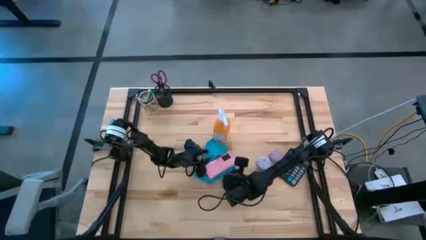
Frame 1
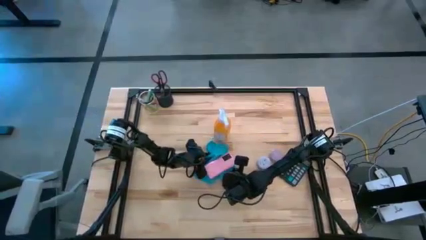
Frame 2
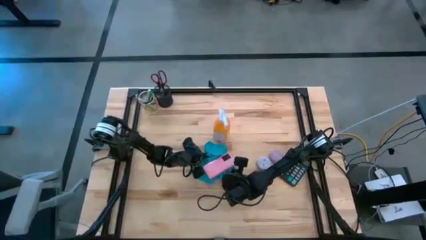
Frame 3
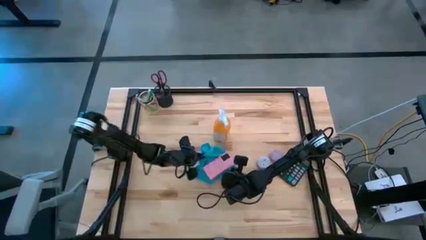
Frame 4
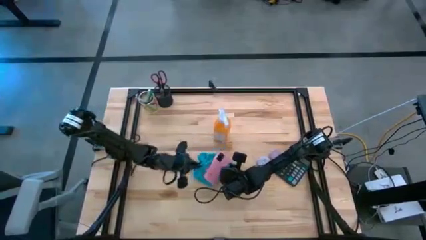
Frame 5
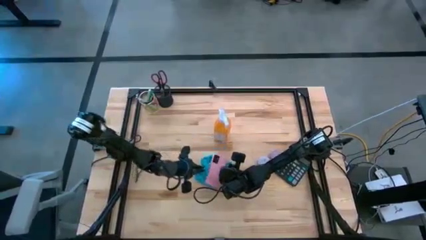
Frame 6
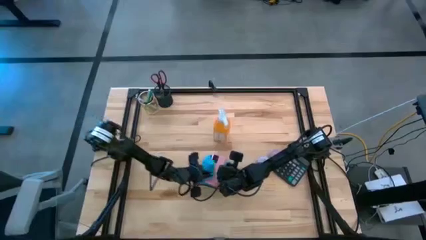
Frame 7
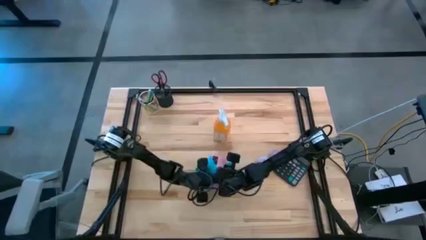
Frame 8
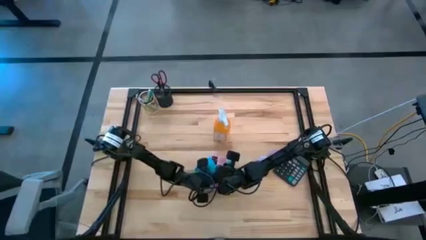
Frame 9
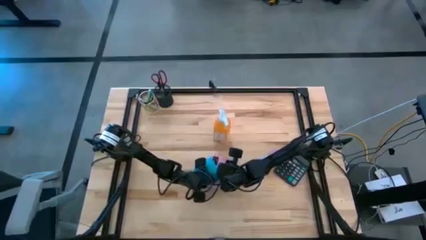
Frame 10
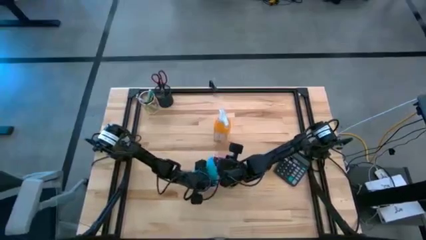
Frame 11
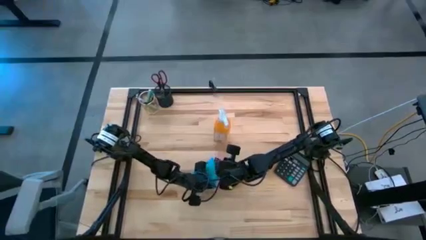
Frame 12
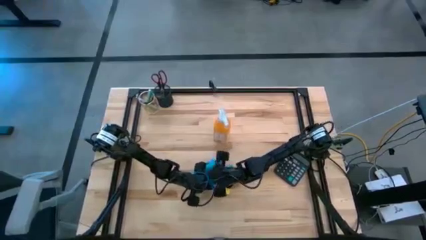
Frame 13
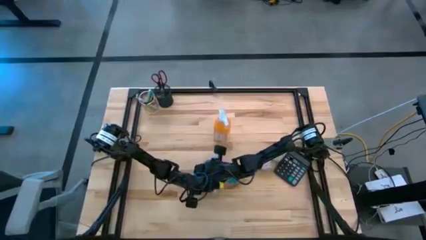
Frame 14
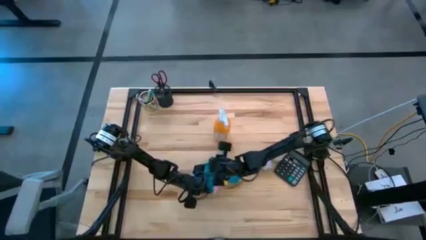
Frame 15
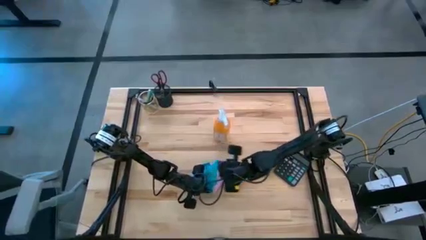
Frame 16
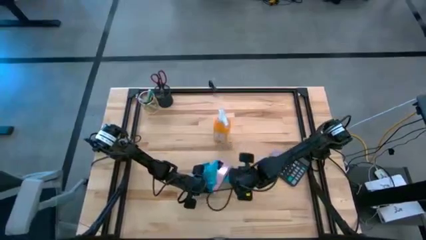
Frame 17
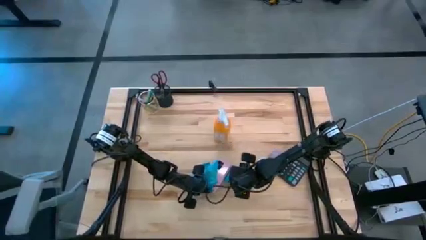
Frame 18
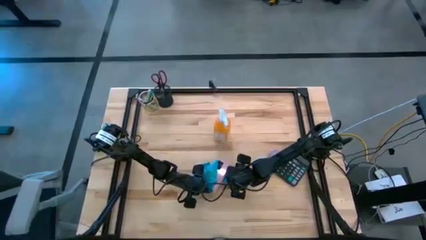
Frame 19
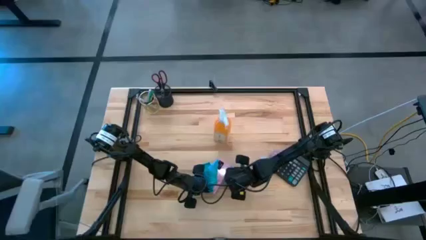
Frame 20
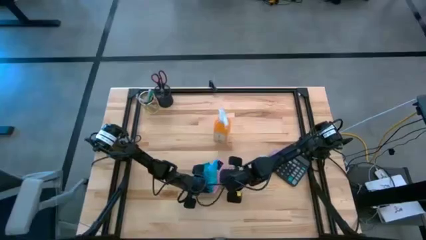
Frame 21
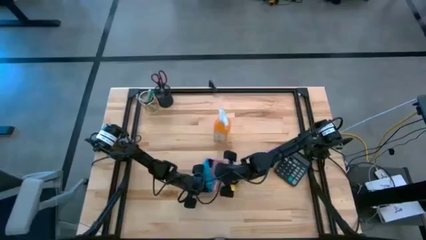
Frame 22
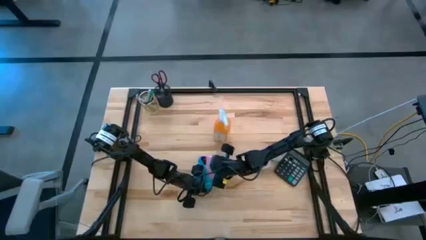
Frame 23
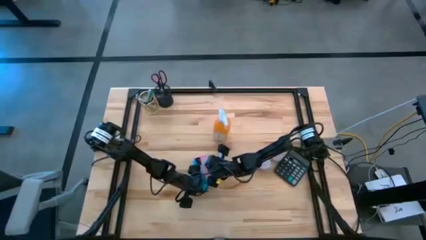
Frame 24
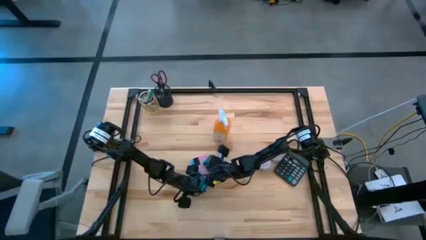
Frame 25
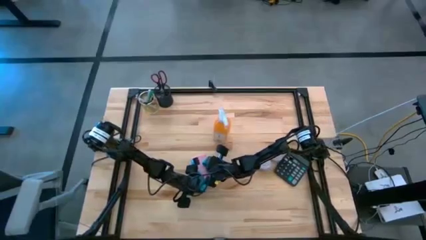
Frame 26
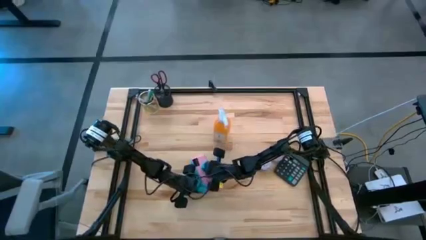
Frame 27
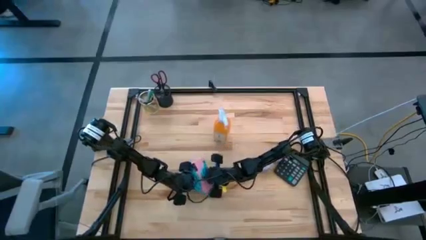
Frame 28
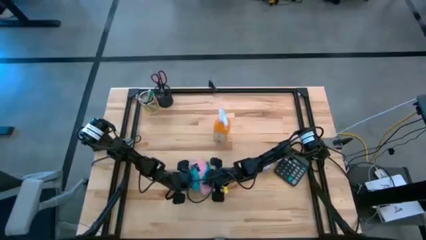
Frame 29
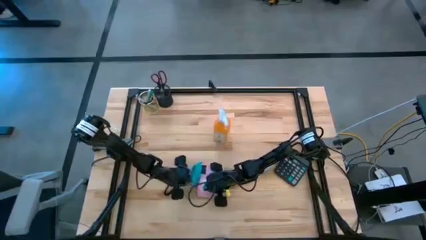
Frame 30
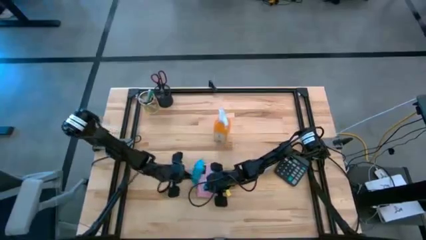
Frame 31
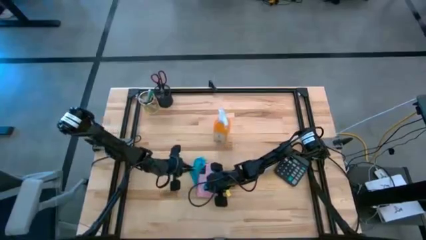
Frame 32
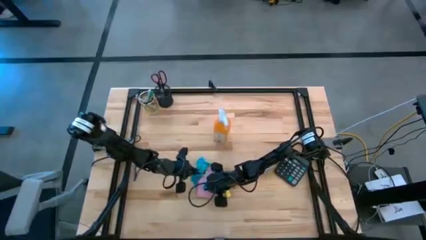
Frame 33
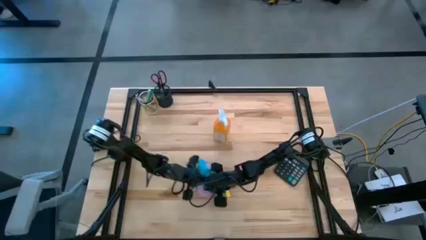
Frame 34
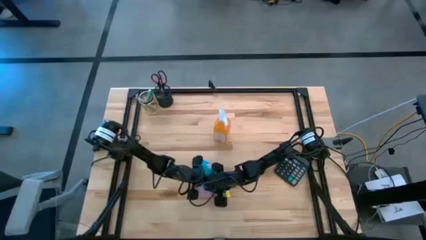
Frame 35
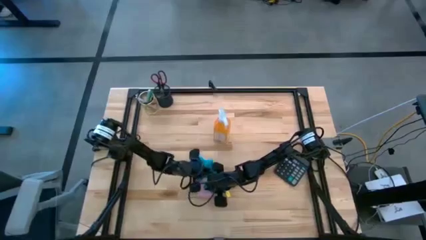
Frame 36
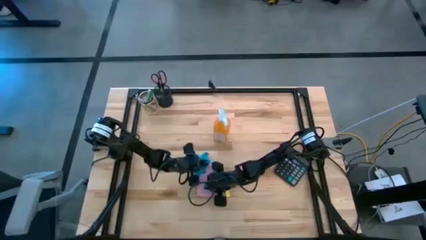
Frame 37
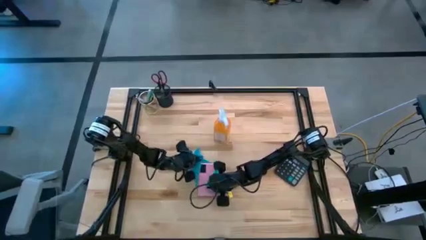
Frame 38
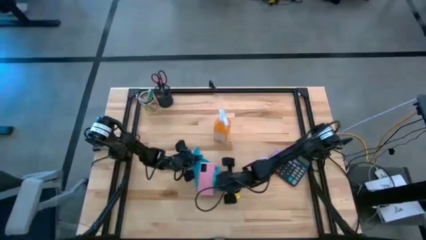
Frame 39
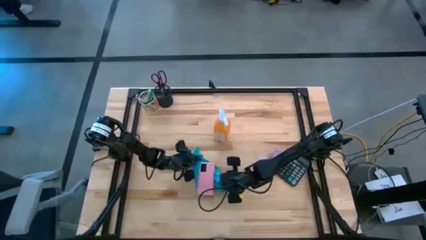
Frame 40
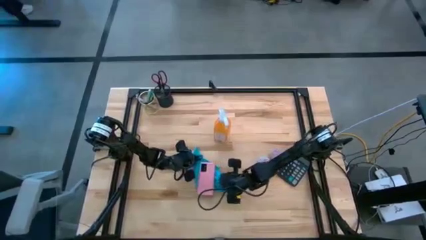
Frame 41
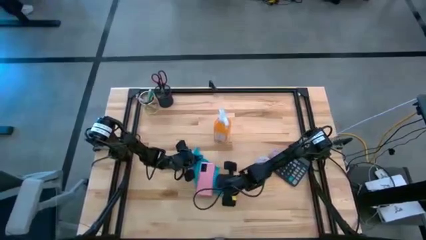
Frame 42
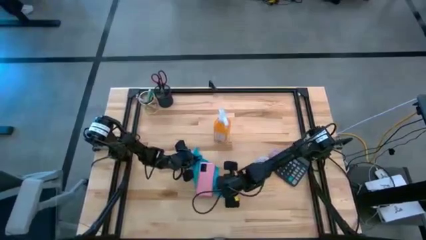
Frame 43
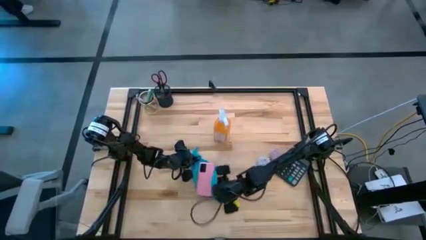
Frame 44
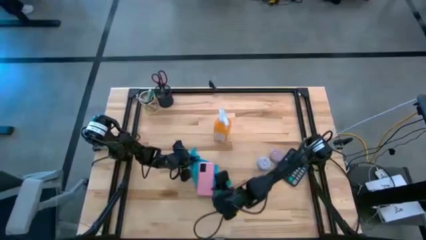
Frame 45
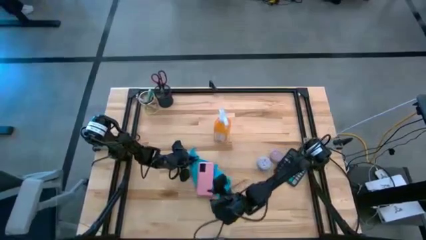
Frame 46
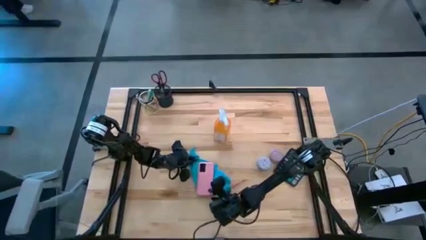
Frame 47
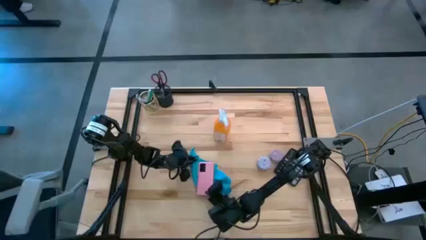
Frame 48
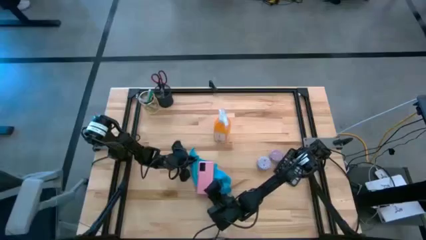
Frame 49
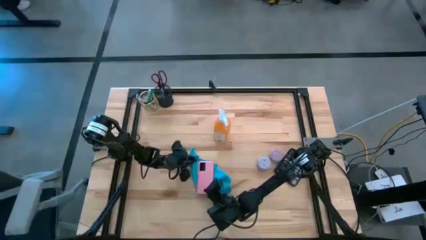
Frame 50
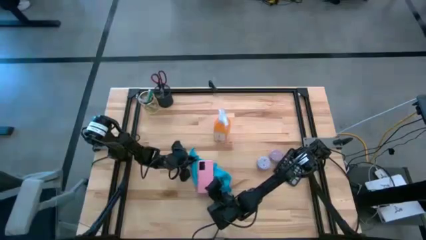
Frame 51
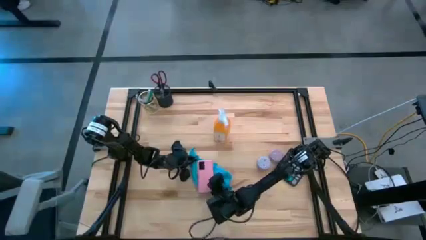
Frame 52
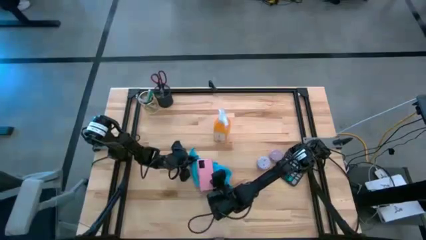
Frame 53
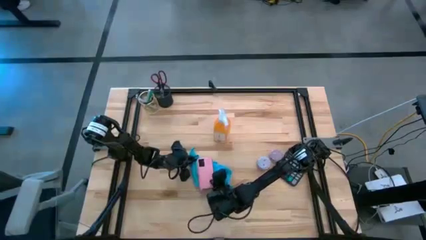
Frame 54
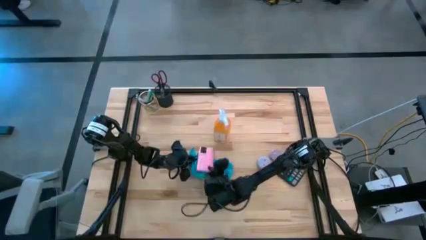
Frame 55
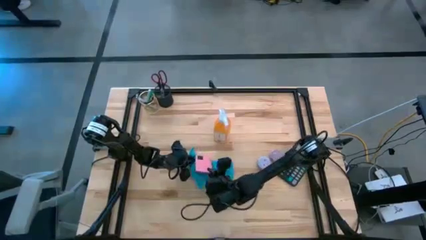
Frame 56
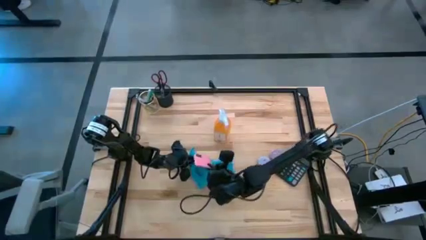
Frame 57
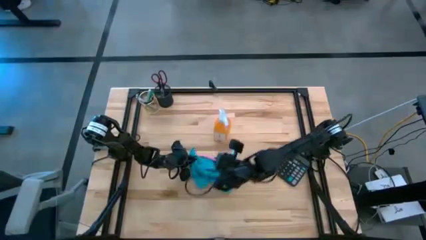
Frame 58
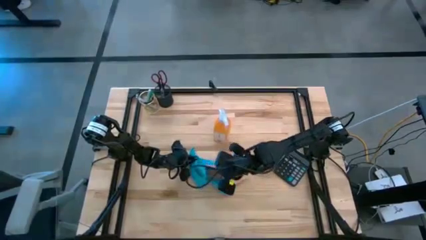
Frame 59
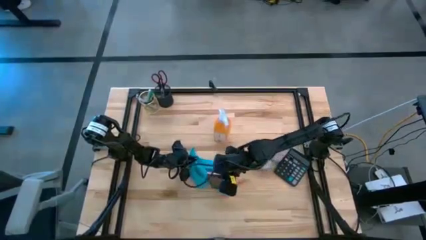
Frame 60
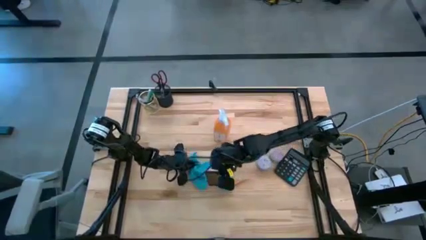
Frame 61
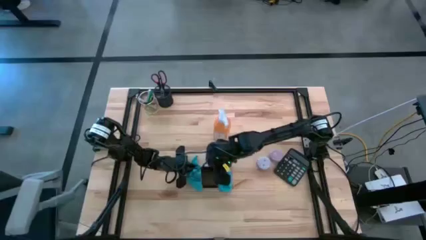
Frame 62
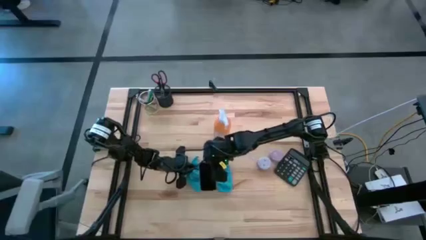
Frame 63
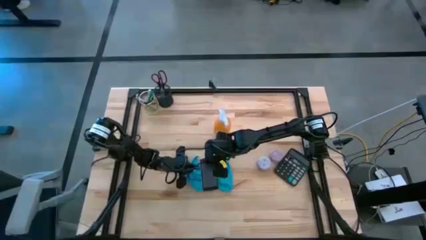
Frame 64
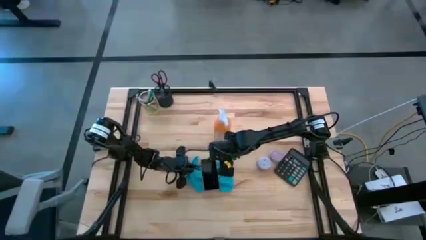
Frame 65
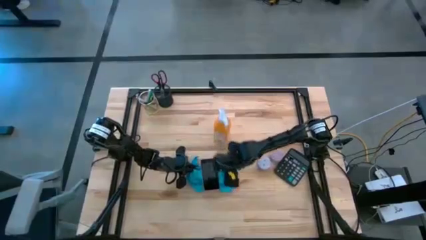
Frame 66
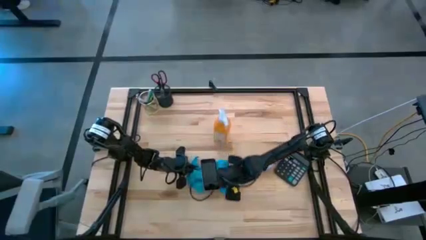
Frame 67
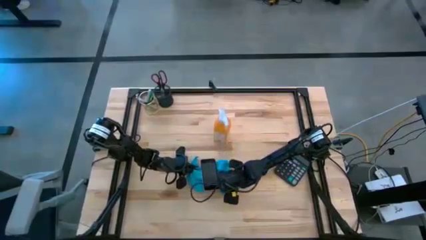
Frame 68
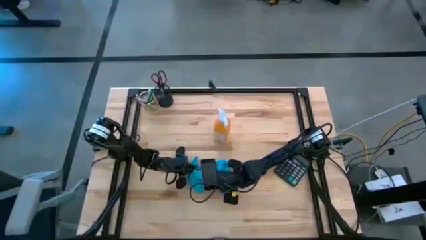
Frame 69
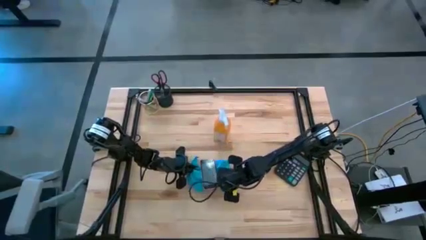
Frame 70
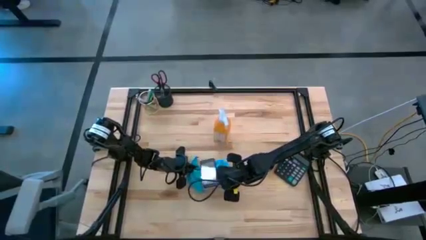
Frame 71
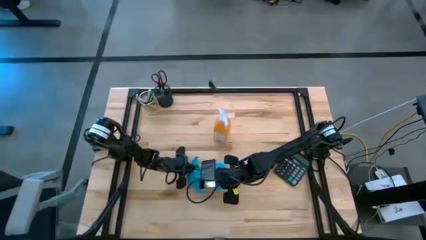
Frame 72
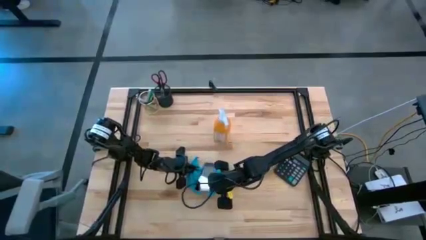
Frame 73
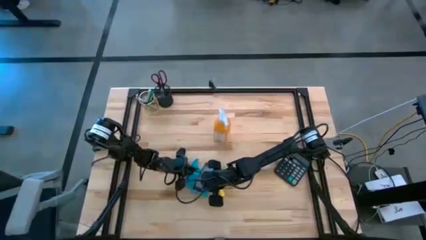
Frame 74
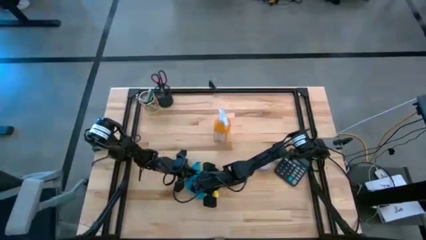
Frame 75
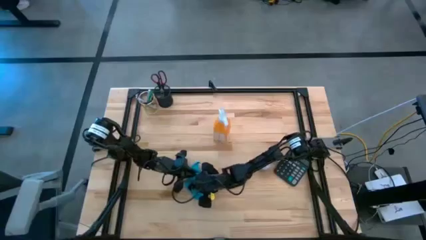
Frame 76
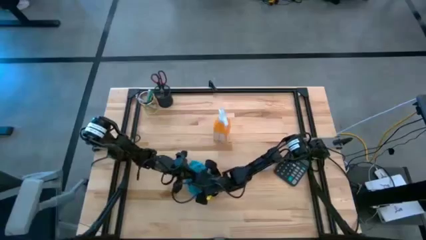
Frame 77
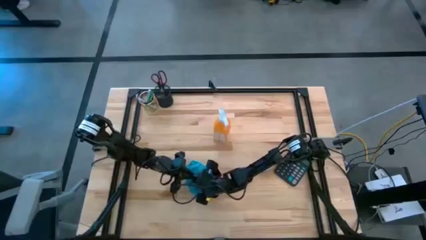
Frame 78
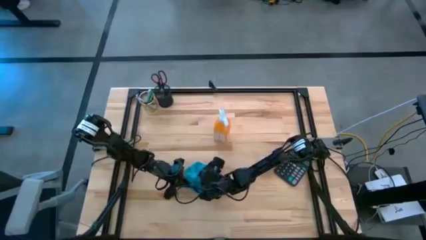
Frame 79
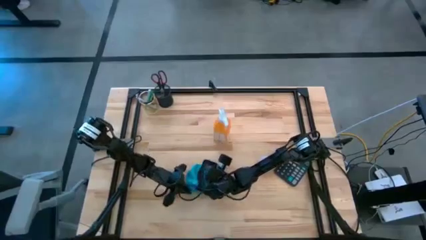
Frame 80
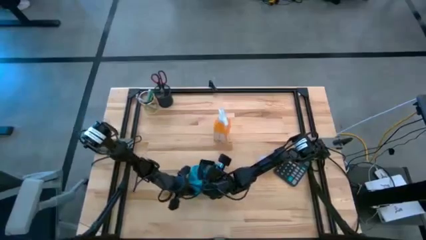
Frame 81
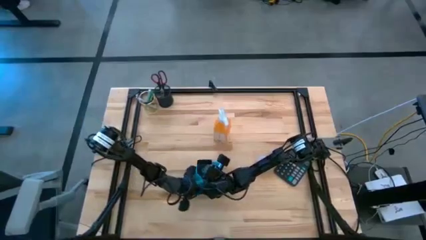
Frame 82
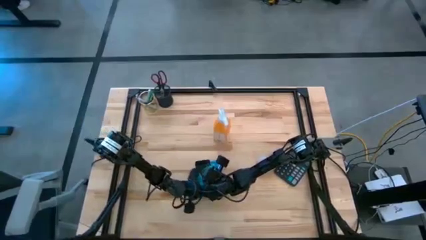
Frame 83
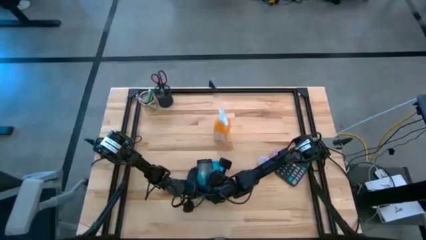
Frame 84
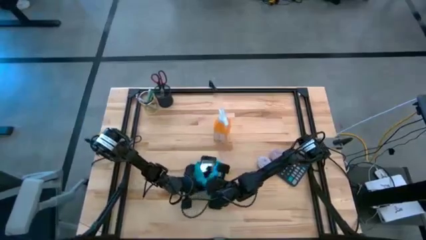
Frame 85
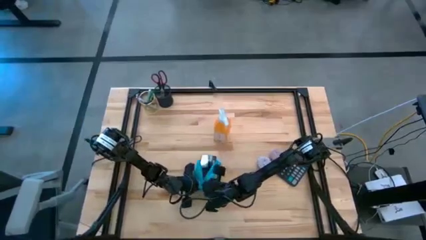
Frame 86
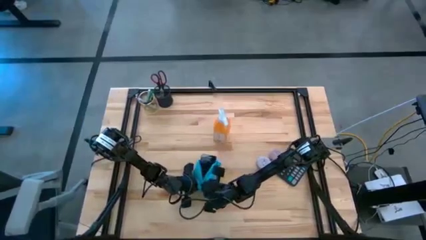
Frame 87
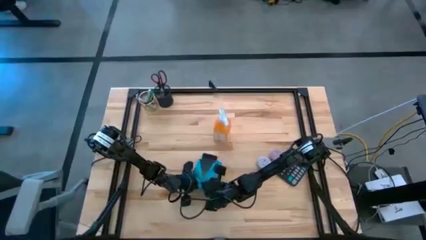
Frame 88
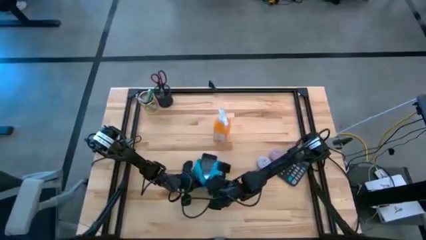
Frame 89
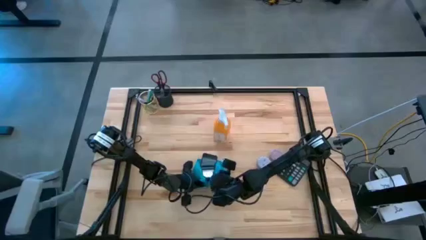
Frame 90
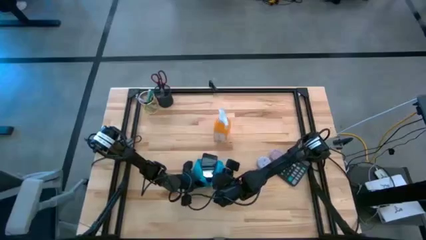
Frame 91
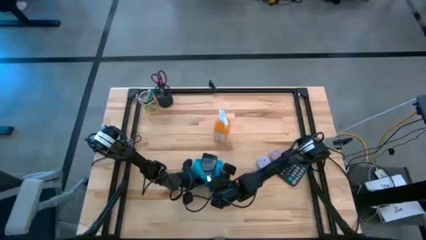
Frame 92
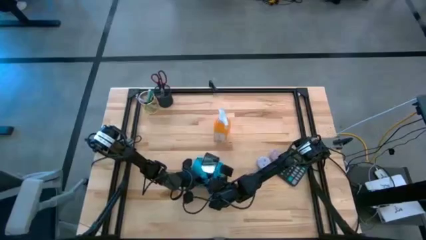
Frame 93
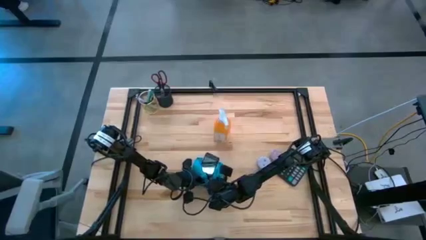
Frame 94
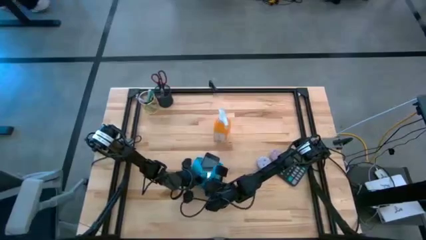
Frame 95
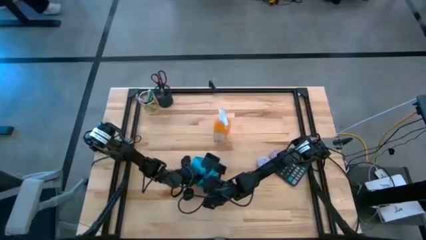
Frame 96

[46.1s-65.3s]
Task: Apply microfiber cloth
Wipe the front and back of the cellphone using the blue microfiber cloth
